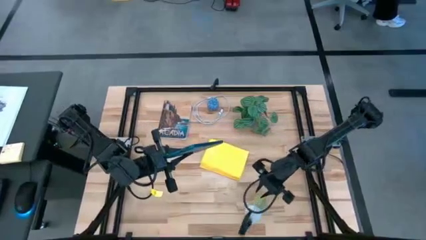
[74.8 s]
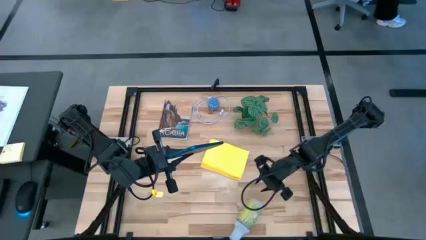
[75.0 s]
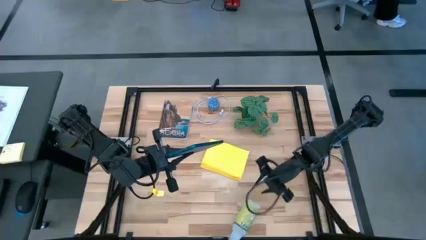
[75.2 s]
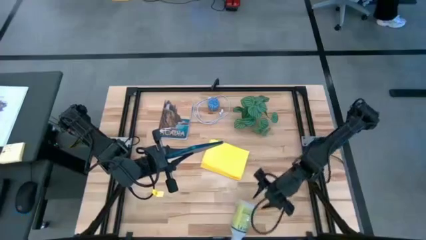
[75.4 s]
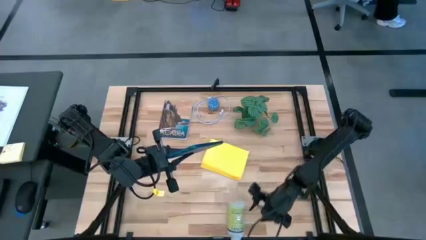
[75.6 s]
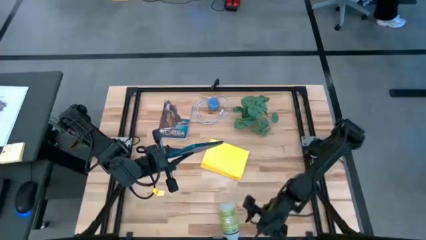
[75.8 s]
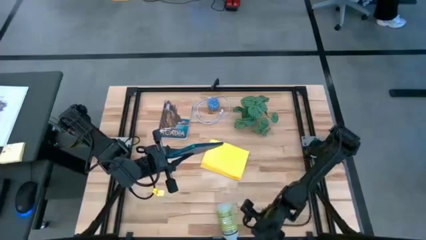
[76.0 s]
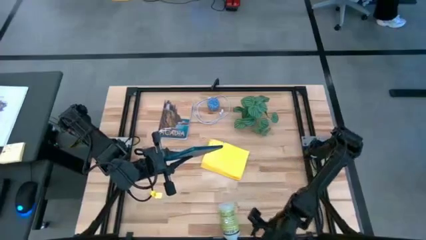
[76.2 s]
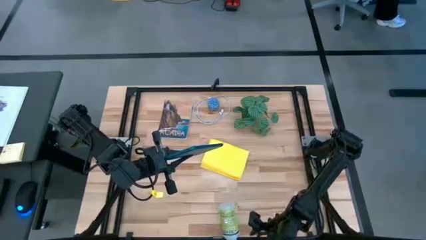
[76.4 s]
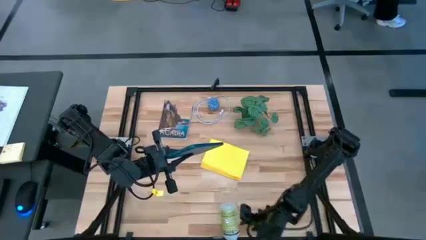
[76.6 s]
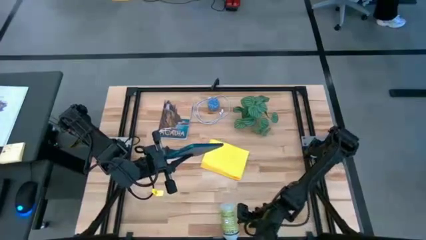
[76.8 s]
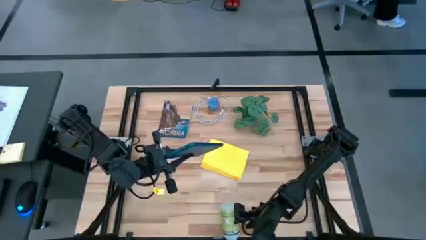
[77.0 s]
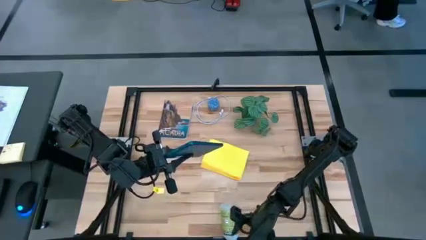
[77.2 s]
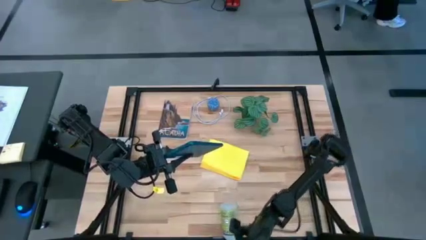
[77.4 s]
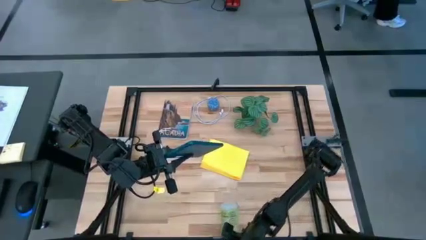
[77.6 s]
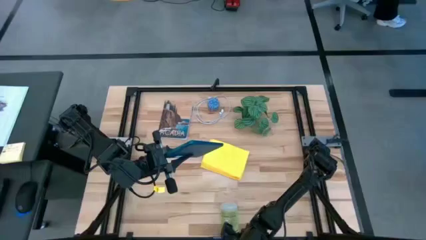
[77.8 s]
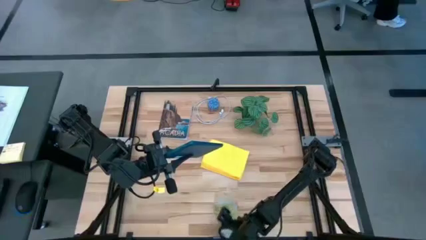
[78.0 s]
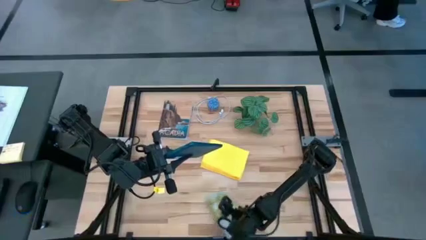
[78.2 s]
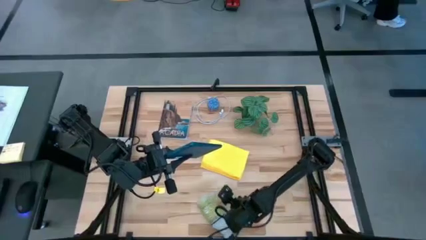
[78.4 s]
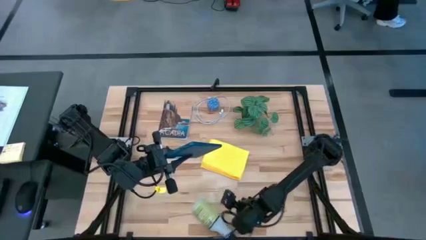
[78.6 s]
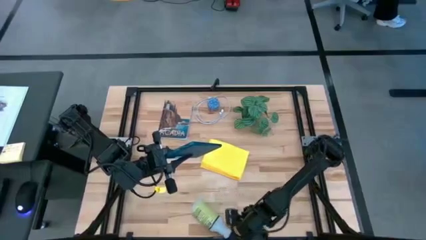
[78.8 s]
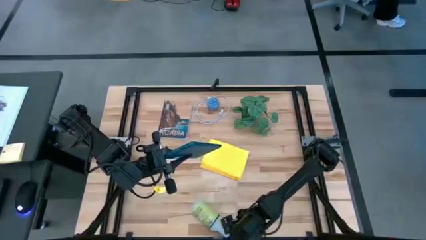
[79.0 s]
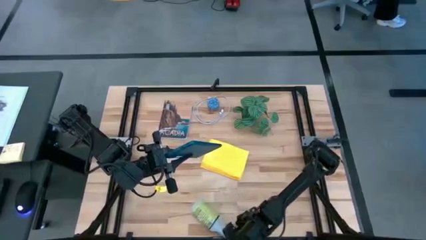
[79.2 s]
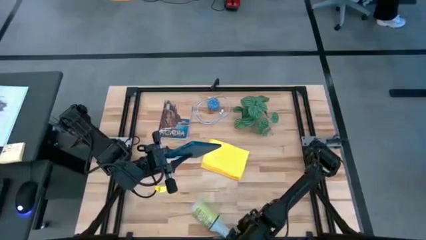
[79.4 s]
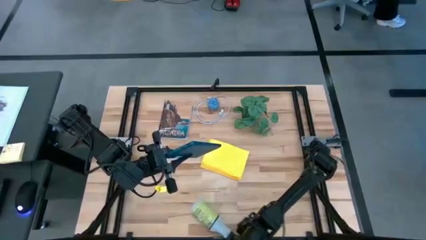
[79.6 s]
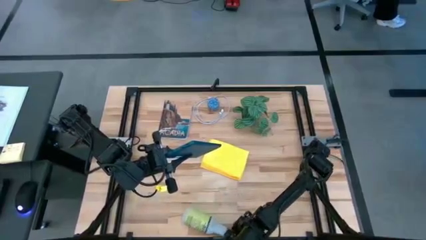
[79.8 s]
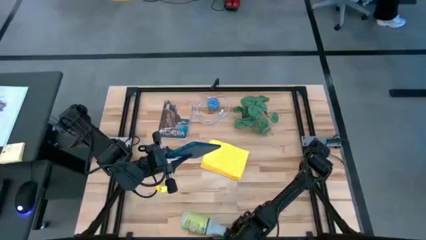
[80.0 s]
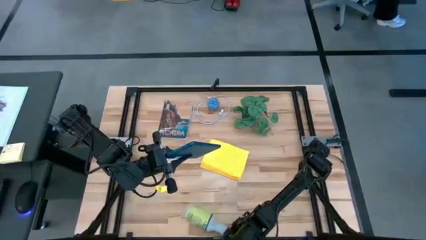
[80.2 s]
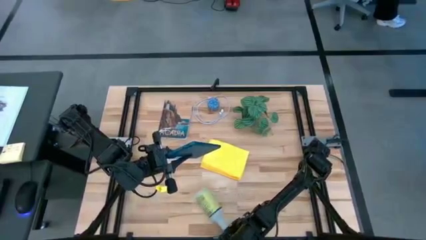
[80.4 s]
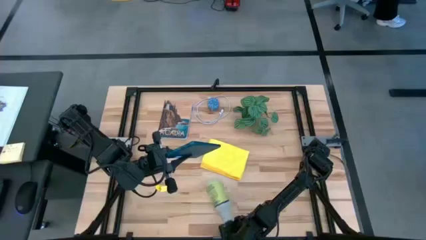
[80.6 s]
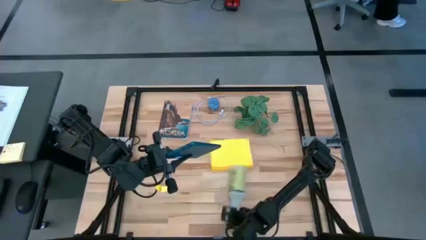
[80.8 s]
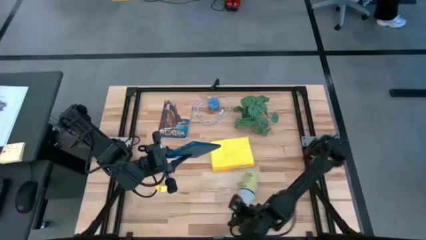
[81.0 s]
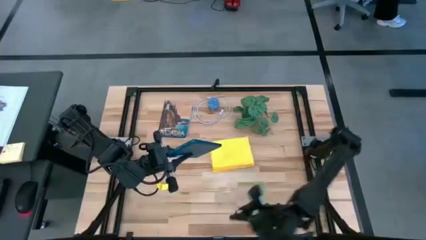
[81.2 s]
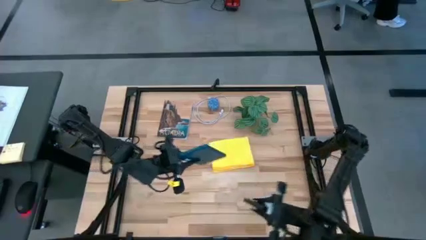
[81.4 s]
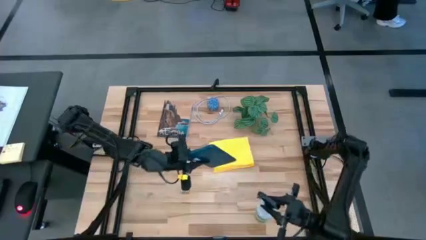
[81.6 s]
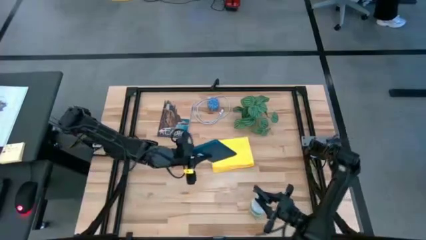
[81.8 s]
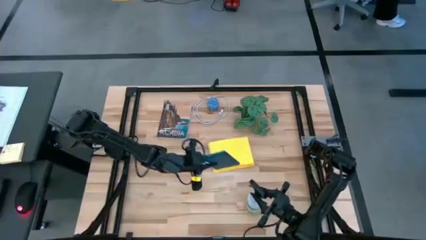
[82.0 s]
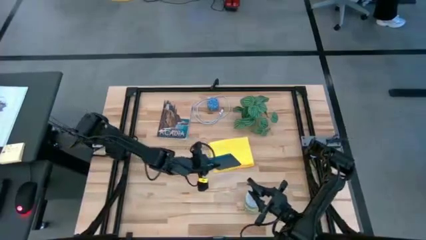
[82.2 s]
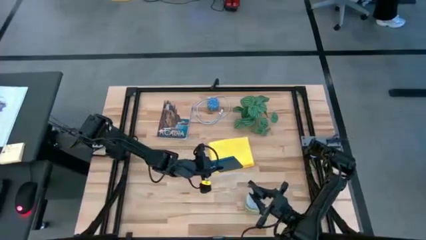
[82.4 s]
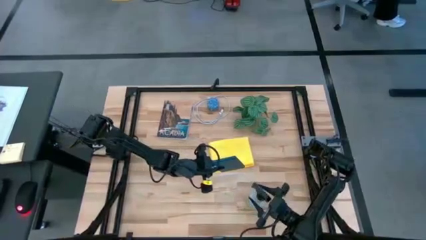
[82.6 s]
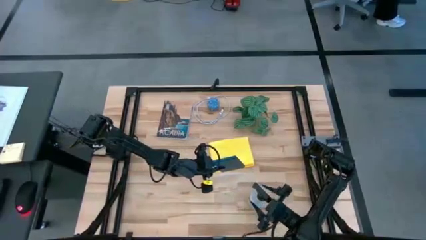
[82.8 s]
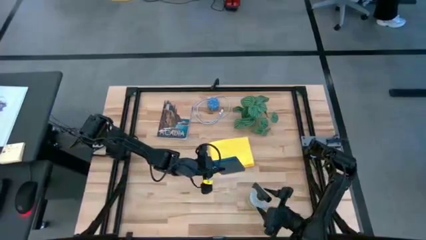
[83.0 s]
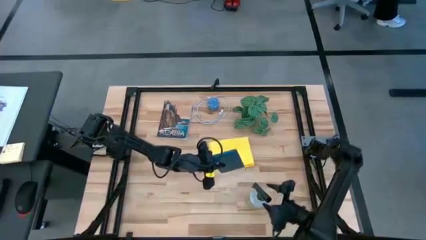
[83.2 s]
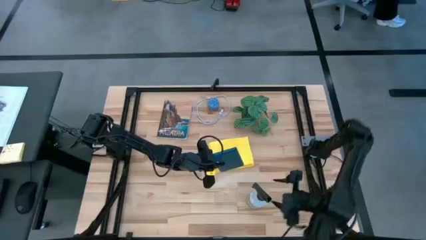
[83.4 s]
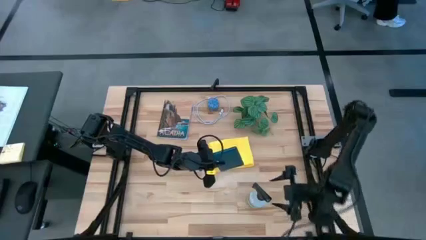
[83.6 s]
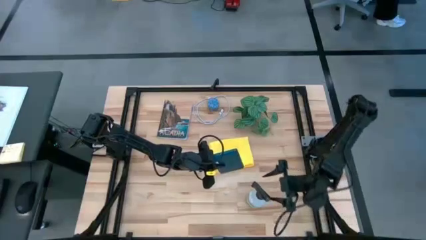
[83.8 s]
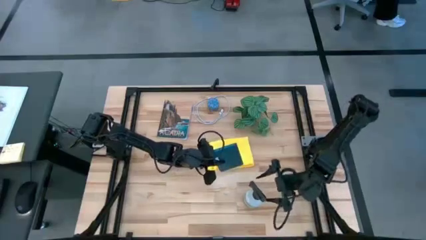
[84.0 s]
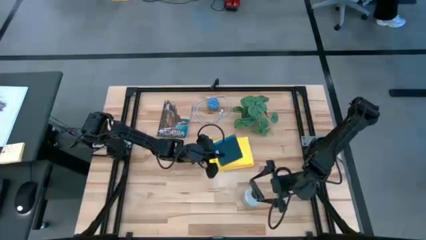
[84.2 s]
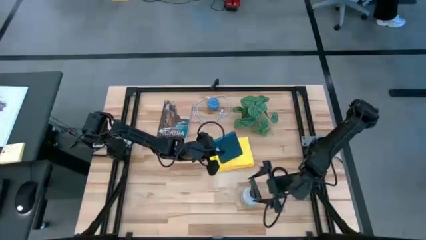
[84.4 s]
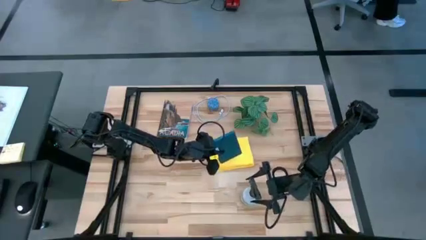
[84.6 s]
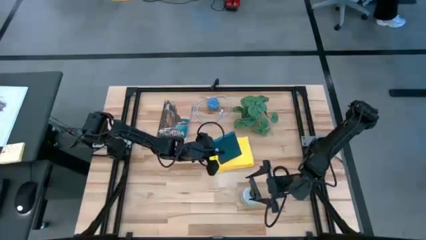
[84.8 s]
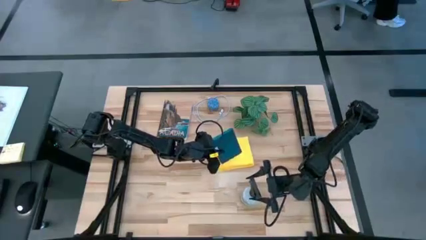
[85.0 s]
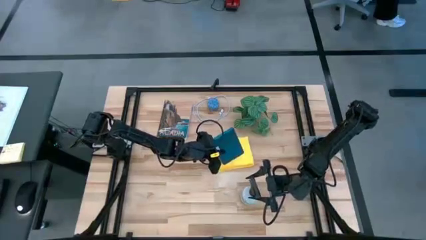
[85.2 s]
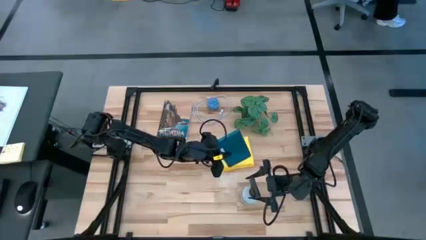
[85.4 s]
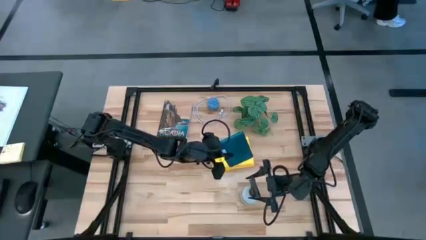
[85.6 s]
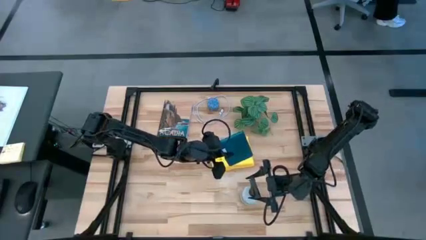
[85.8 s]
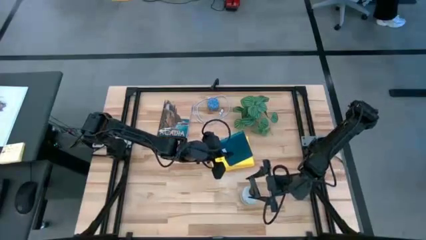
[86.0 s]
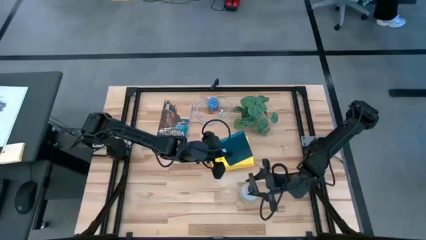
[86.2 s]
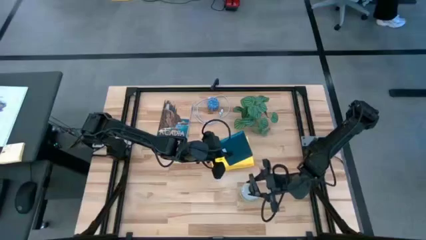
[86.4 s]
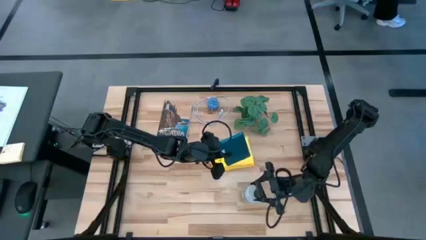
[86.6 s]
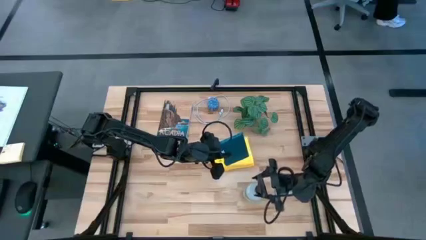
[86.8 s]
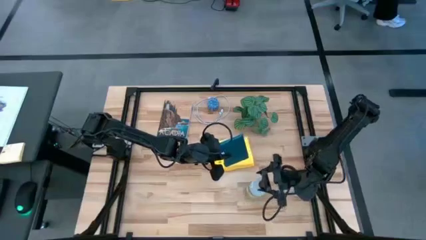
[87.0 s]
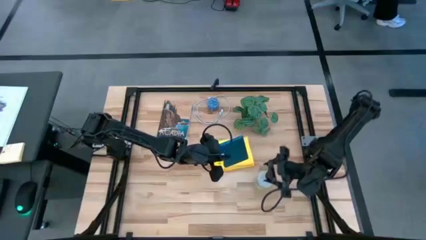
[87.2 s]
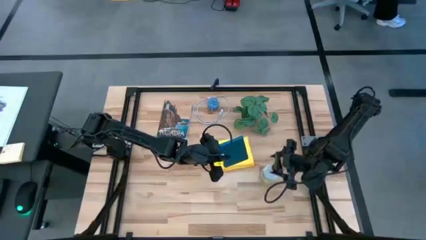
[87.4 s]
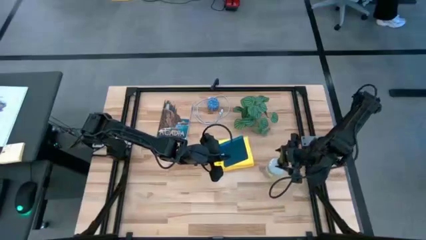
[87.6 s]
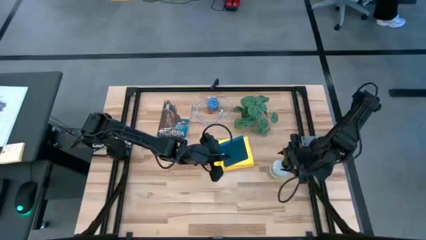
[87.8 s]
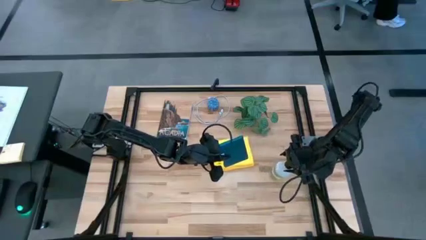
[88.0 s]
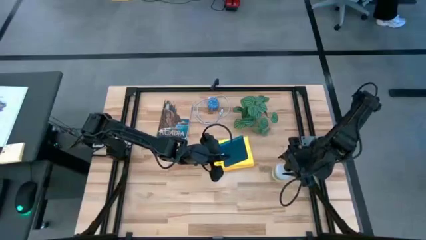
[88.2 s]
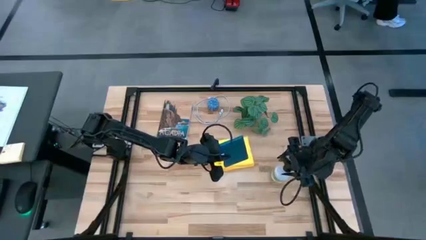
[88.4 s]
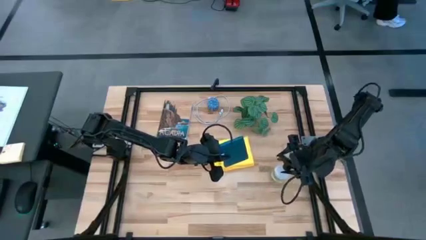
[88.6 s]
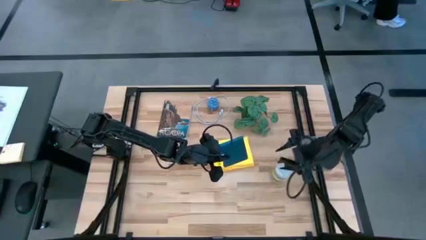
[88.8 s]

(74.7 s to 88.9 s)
Task: Apply microfiber cloth
Spray the blue tablet using the cleaning bottle
